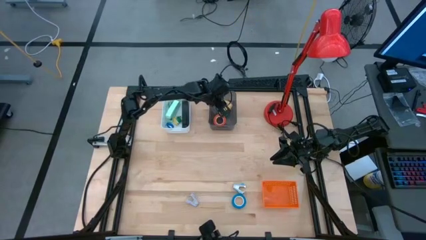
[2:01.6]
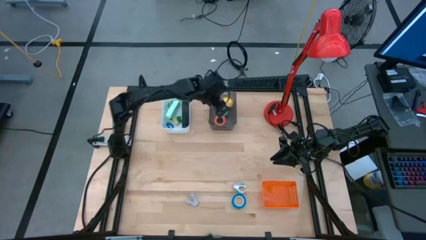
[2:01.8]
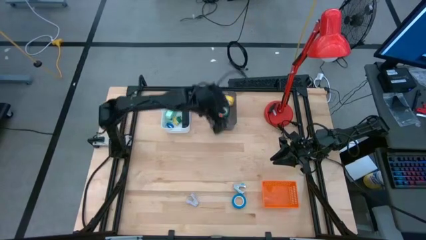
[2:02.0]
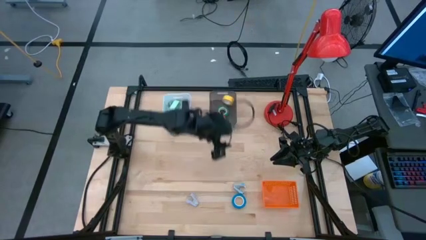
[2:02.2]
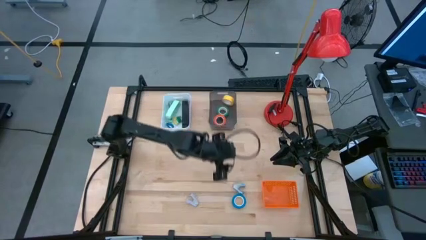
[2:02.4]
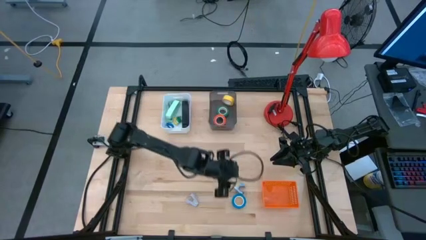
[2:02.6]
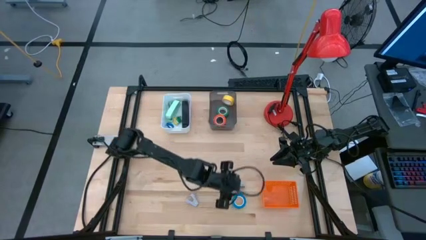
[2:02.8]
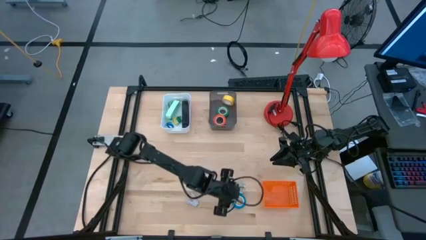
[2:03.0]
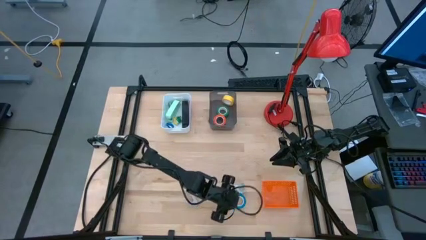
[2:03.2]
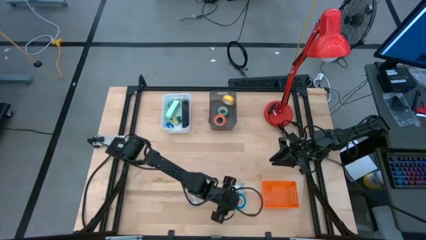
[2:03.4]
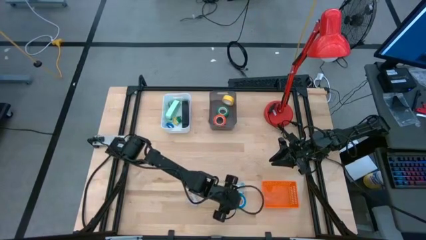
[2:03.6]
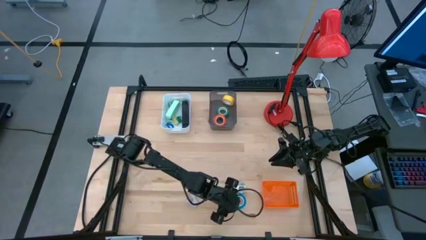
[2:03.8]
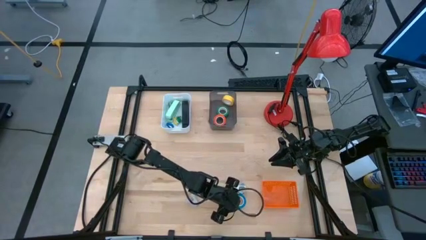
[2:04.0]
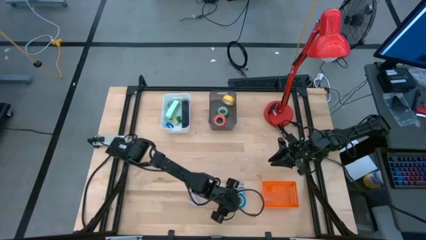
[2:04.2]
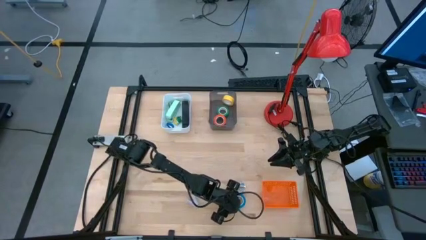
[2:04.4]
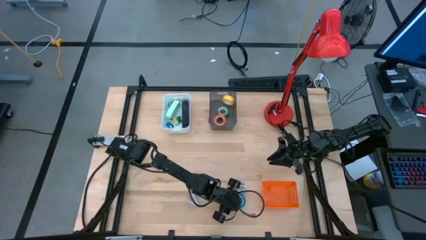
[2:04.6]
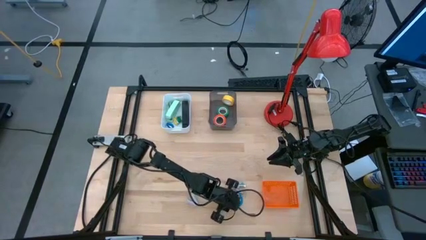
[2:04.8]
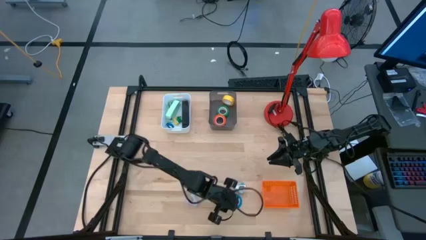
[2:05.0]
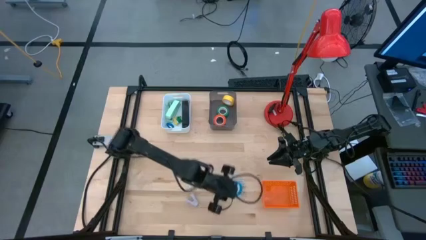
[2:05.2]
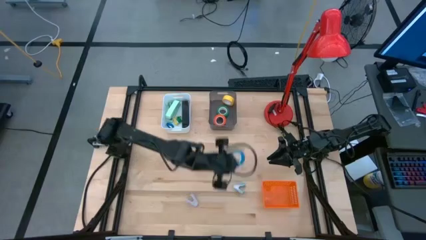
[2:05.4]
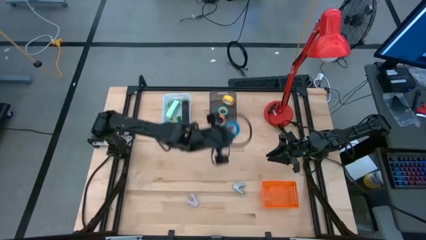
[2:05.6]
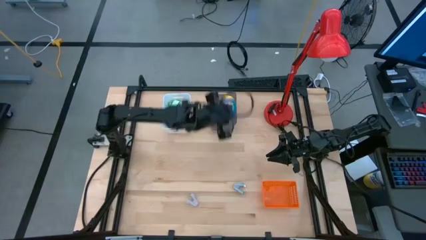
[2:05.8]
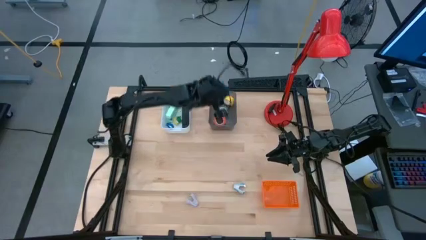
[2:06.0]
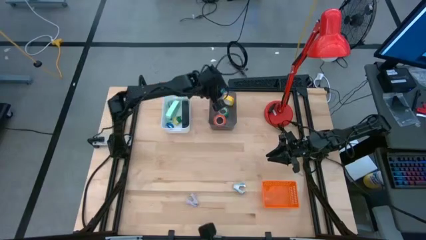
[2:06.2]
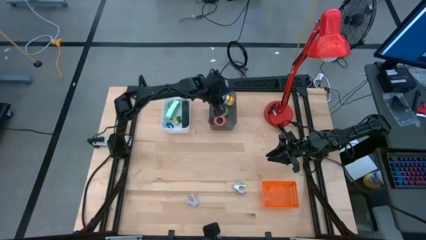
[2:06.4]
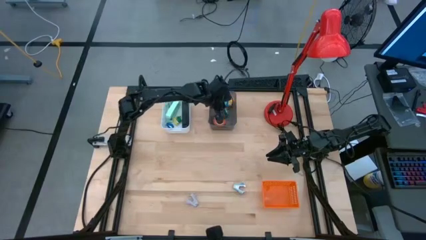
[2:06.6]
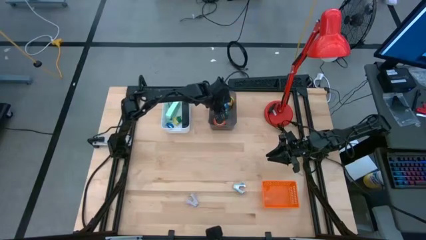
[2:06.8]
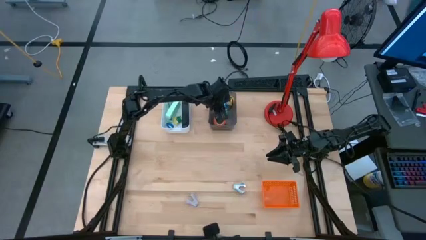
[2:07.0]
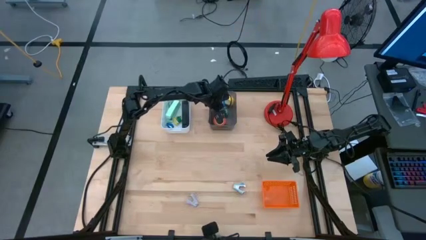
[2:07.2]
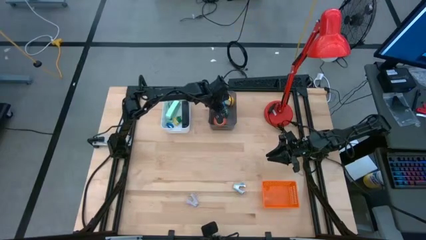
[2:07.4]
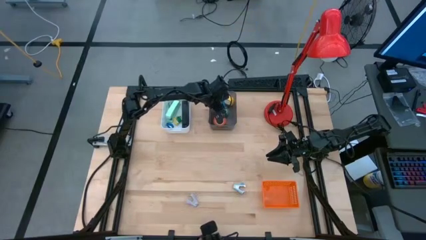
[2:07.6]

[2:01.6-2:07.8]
Task: Pick and place Stapler, Stapler remover, tape
Put the blue tape into the black bin

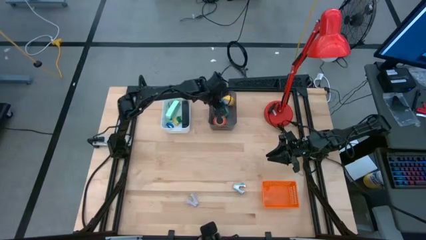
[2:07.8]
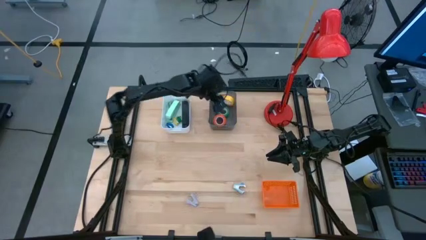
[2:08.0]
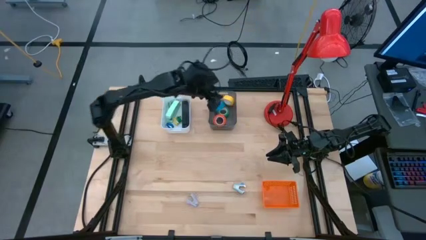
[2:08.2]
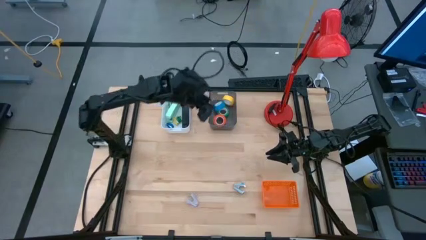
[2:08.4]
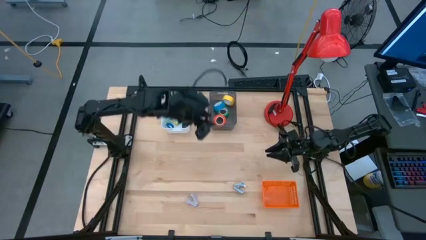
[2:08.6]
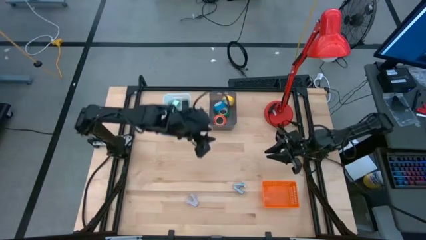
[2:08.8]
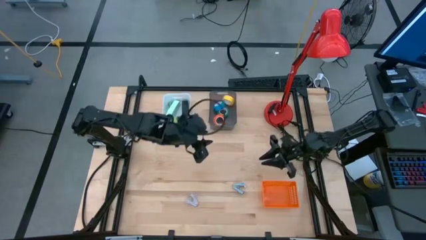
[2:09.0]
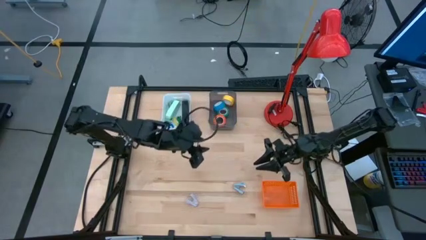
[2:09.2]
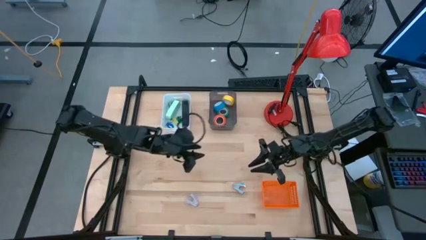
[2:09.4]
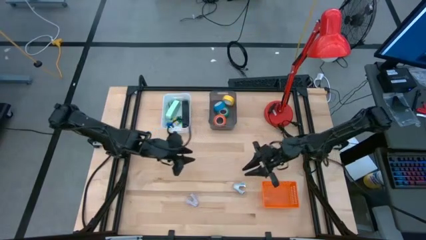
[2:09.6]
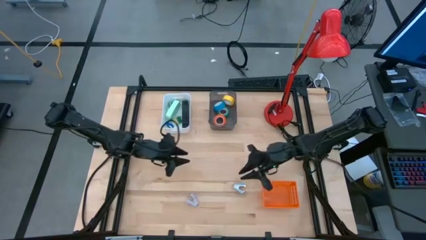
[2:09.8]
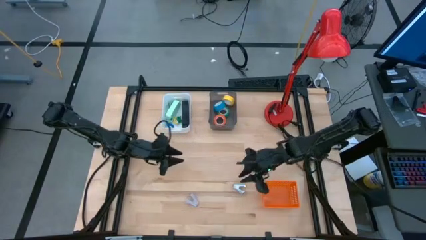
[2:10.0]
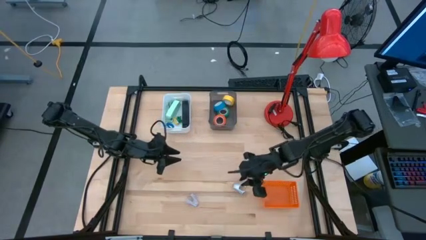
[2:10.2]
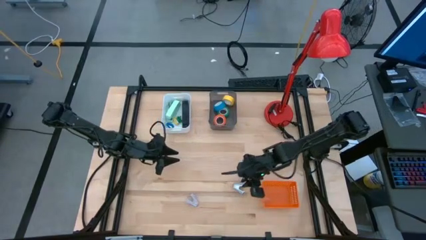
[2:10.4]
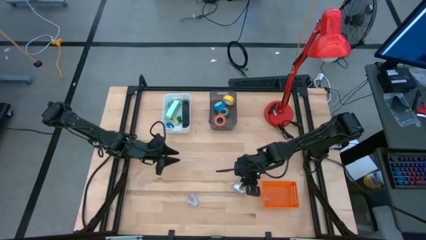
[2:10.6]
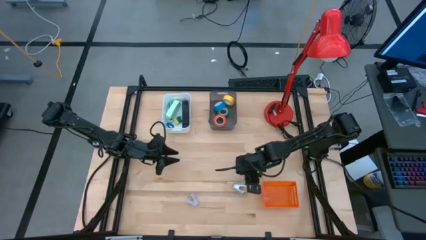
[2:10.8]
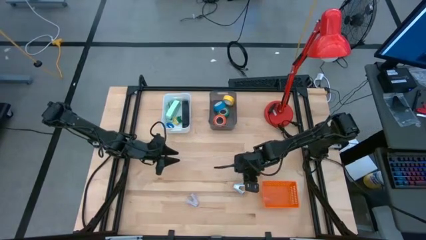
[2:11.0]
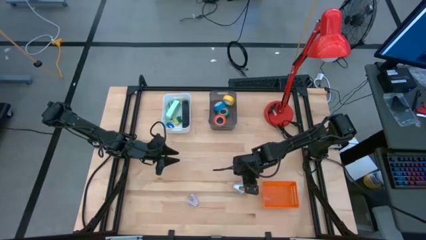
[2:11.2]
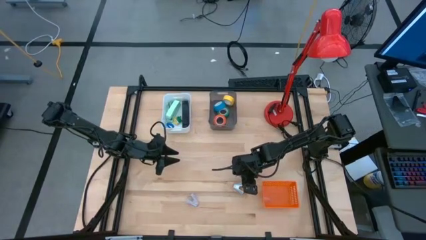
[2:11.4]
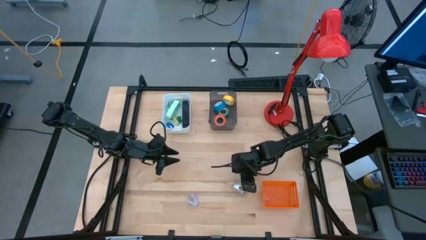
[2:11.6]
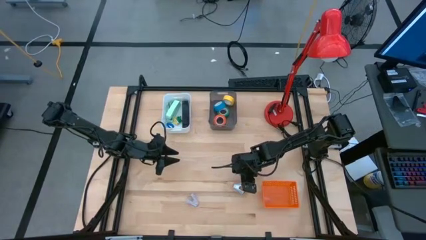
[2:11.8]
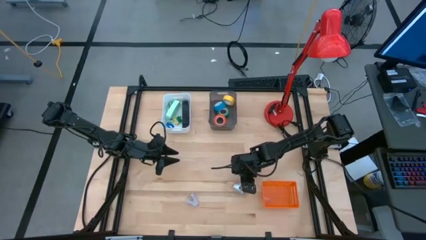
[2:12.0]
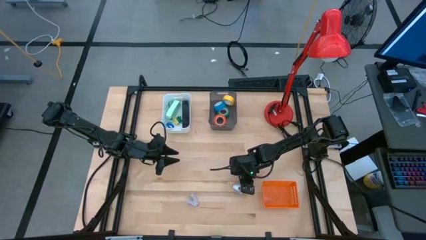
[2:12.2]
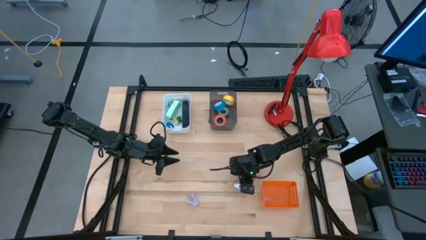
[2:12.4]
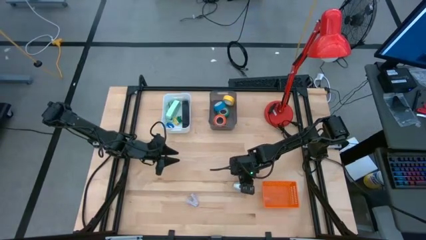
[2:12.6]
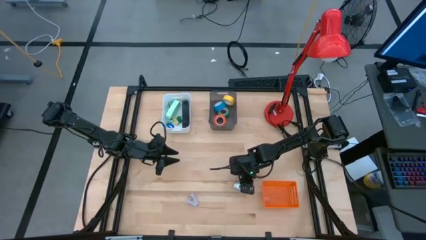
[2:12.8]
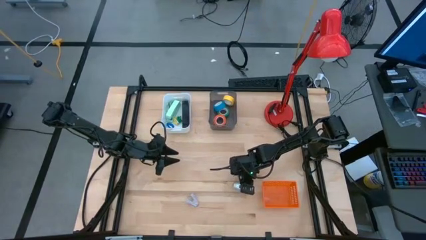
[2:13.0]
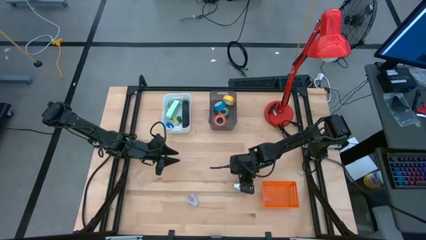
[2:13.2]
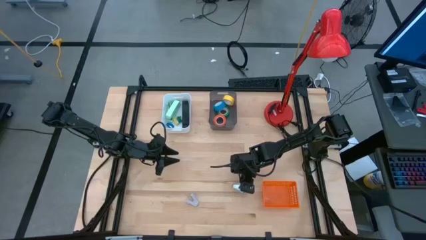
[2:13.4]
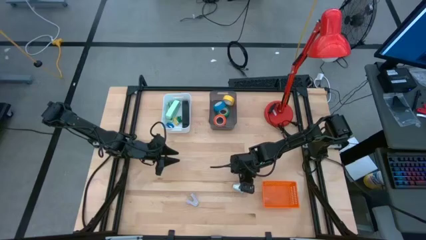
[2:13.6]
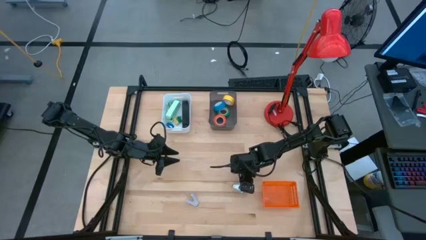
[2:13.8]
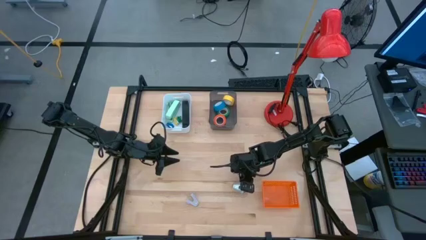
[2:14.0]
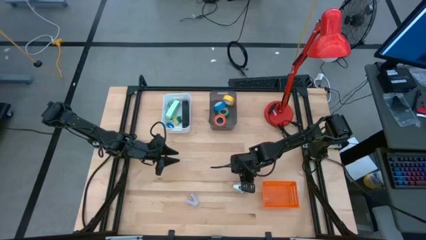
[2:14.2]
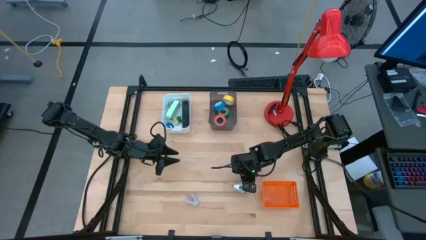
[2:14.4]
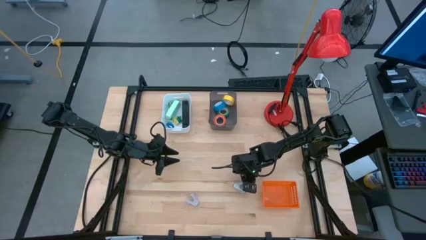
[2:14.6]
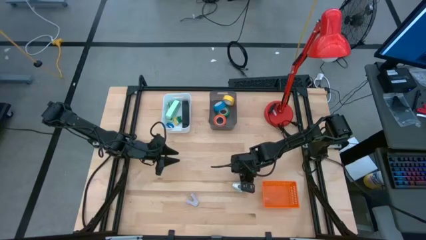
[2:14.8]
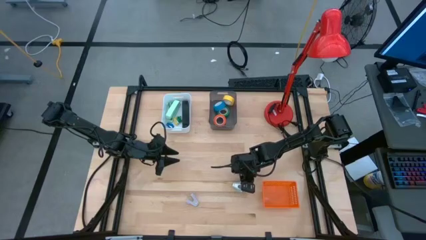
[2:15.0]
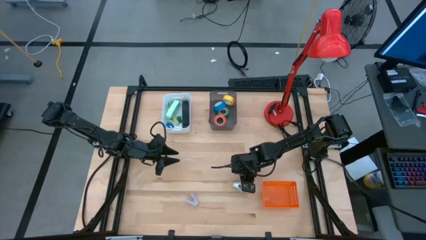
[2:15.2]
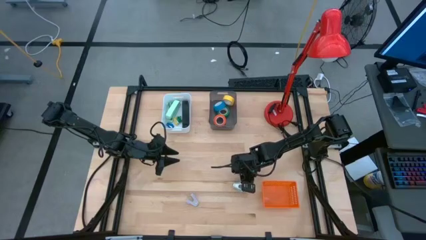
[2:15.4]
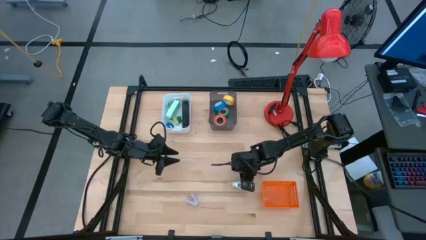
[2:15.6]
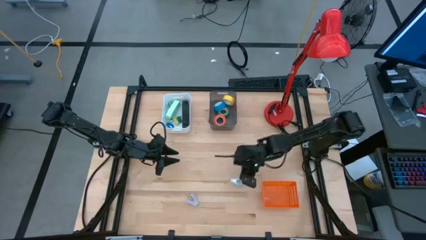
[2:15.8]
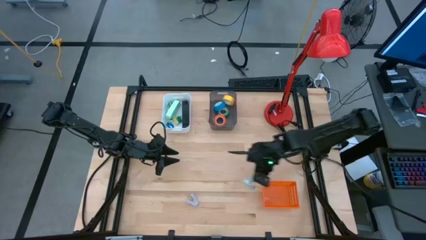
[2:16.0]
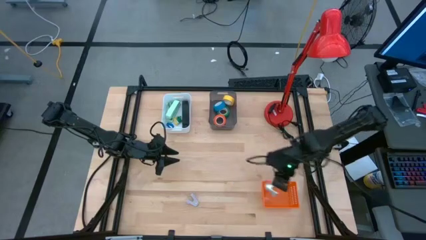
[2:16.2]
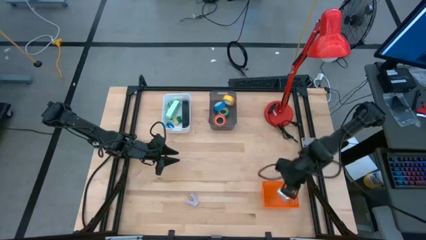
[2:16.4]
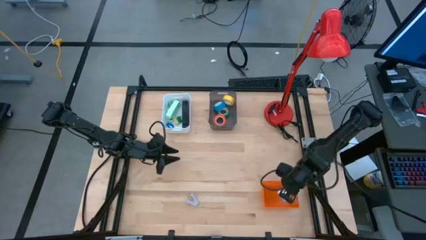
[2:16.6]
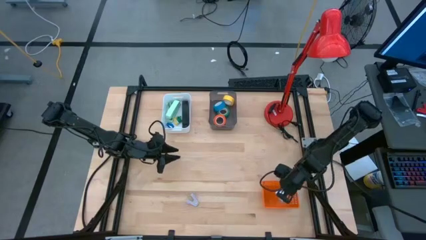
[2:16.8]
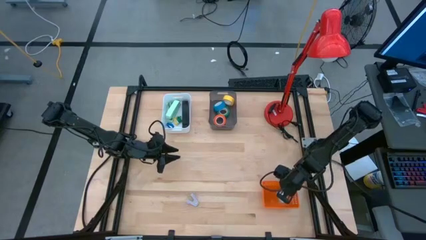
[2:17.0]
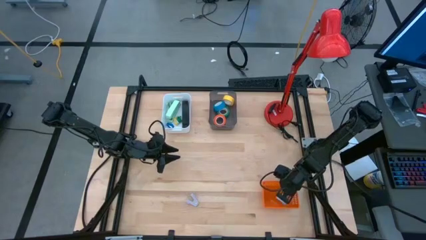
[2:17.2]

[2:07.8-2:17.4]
Put the gray staple remover into the orange bin

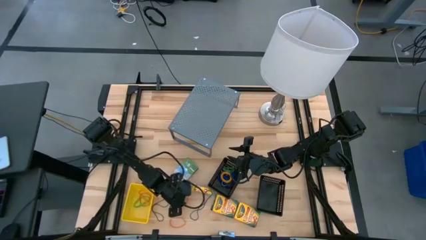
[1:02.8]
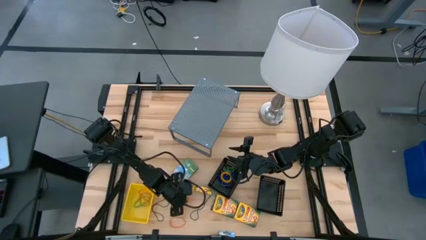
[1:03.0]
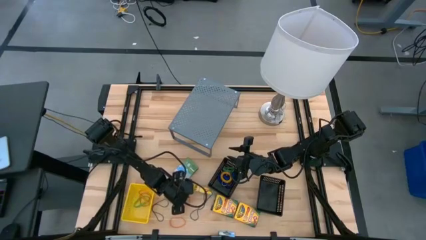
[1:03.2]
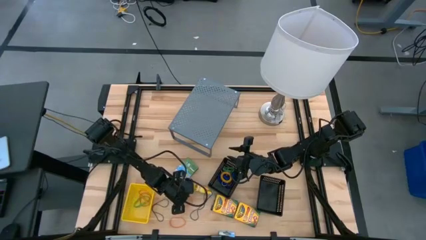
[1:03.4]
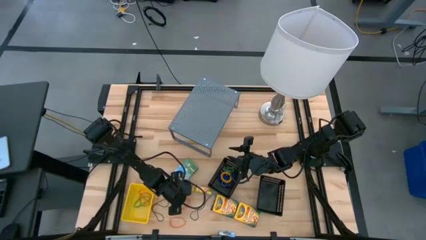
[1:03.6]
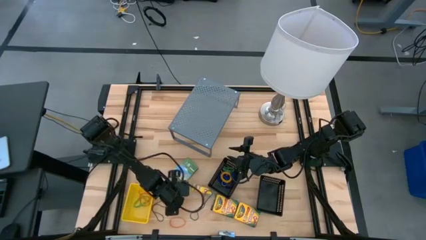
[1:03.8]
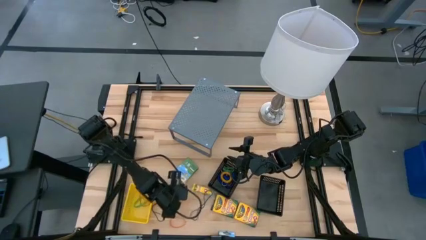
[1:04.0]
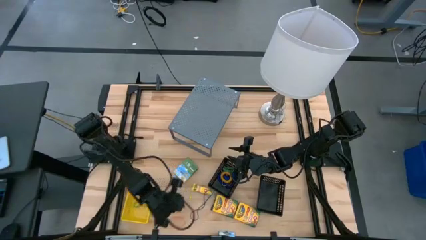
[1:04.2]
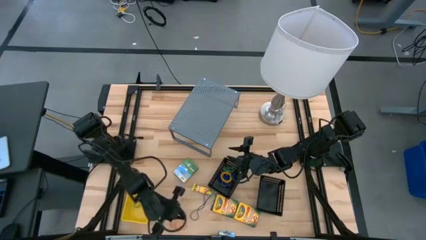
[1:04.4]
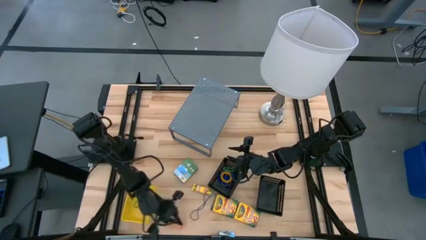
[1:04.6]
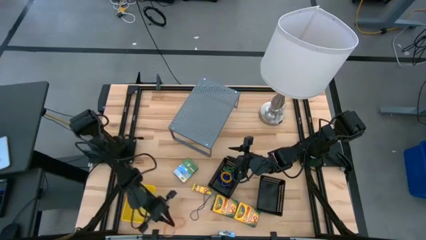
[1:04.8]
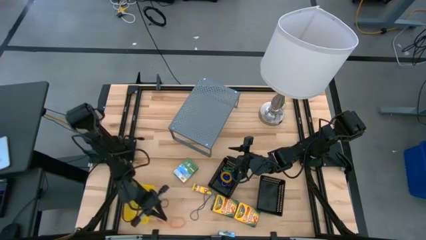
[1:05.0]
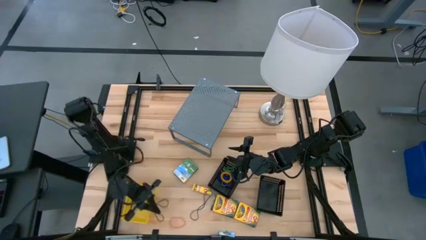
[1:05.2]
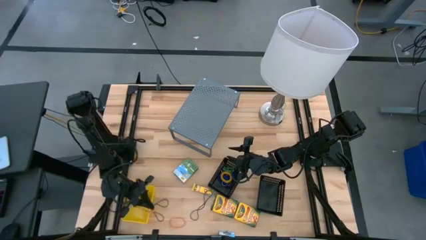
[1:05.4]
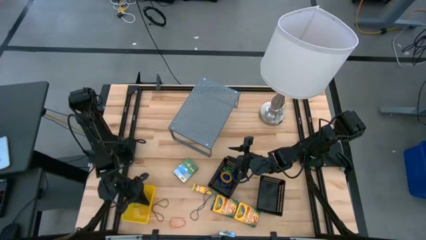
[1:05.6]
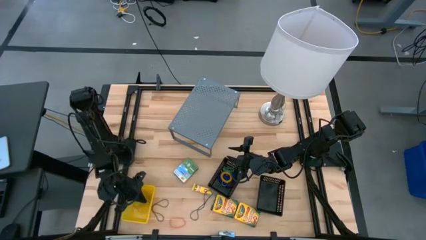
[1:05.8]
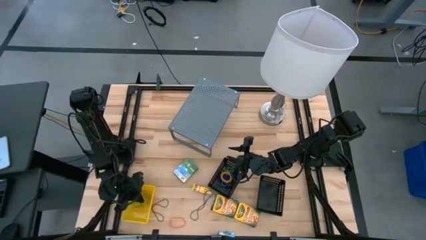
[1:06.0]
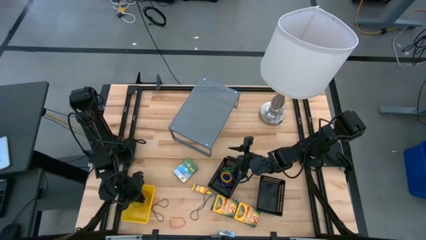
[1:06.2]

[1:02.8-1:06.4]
Task: Pick & Place Office Desk Supplies
Put the orange rubber band into the yellow bin
